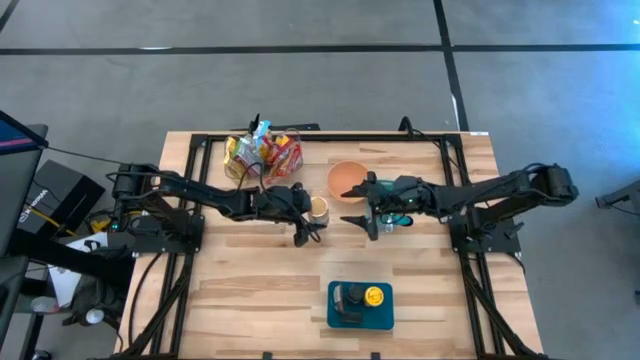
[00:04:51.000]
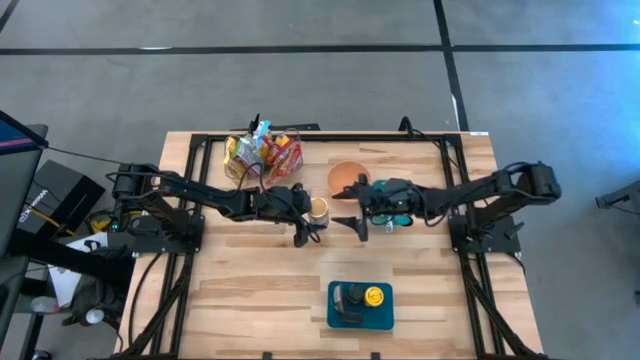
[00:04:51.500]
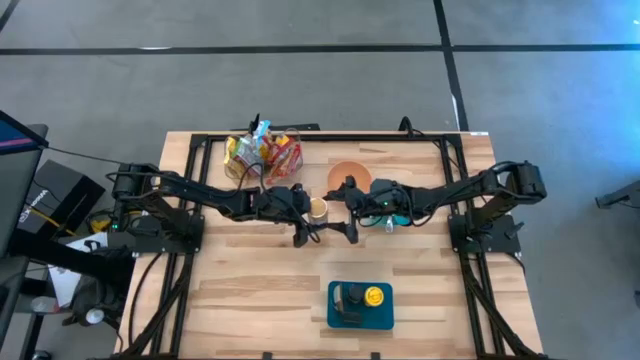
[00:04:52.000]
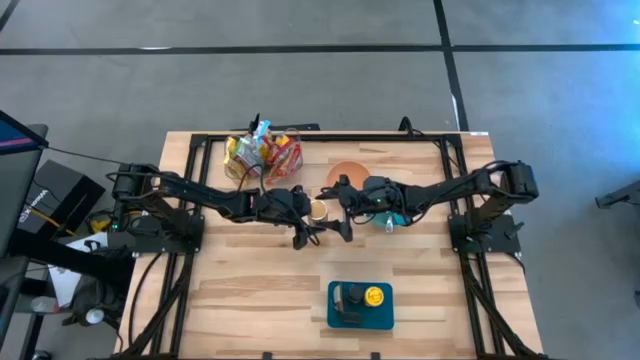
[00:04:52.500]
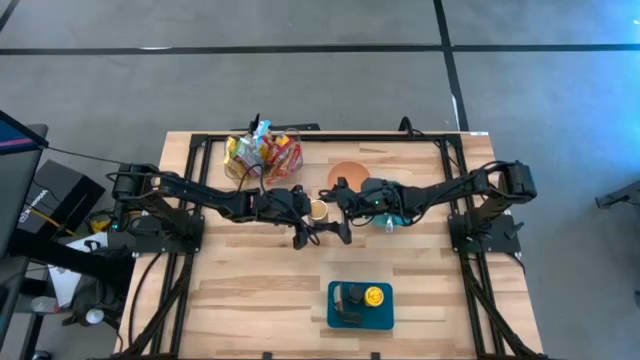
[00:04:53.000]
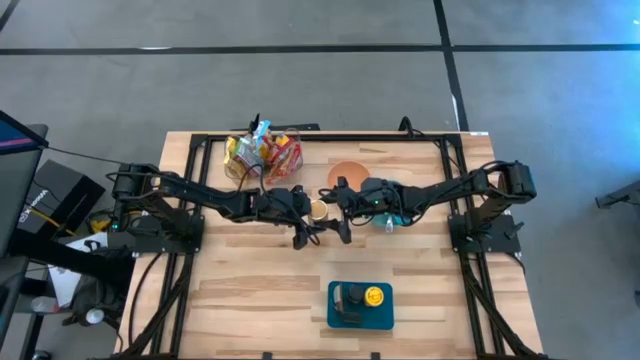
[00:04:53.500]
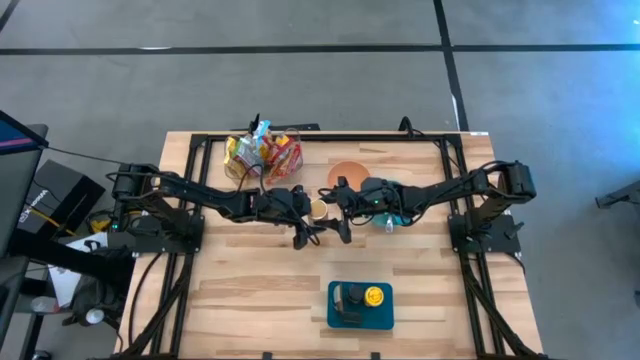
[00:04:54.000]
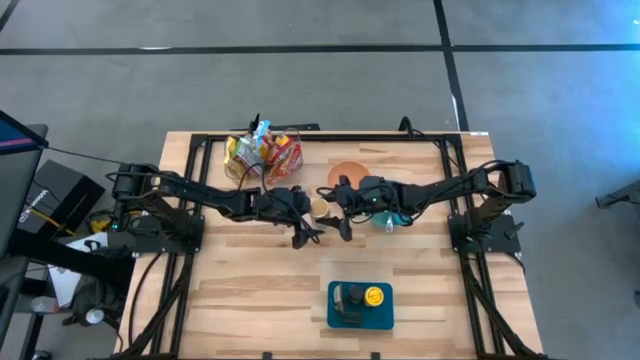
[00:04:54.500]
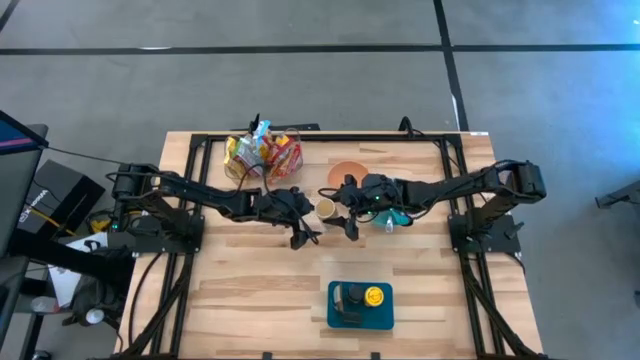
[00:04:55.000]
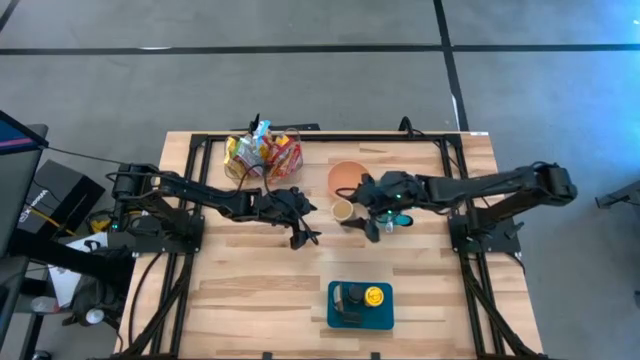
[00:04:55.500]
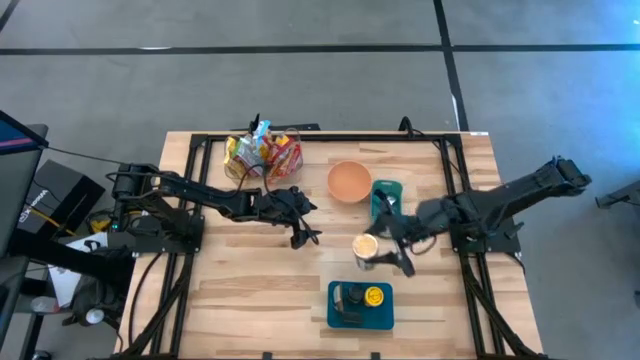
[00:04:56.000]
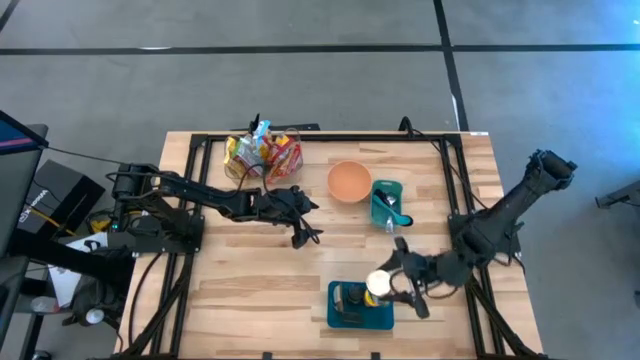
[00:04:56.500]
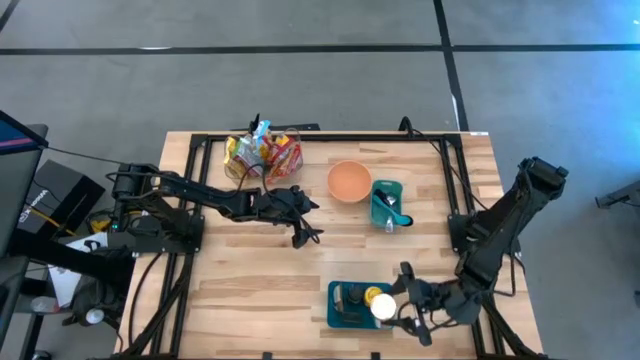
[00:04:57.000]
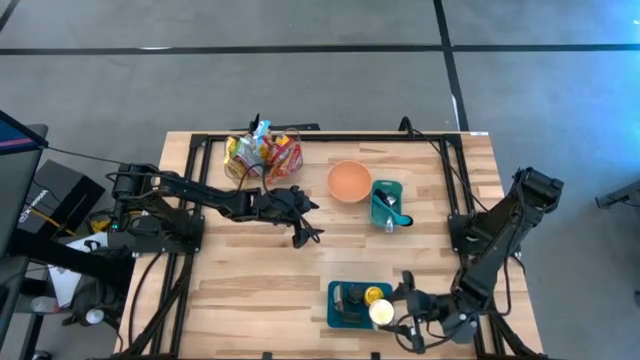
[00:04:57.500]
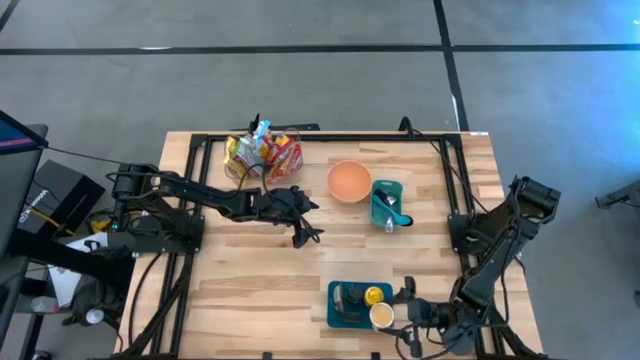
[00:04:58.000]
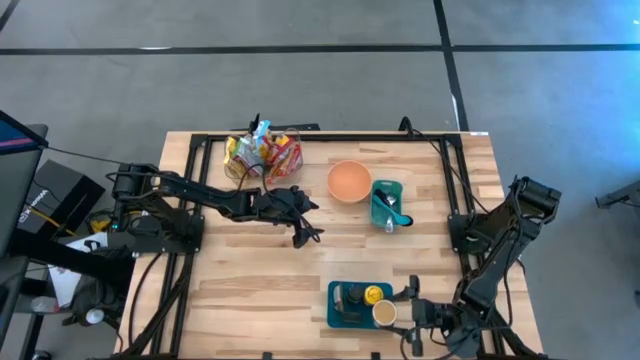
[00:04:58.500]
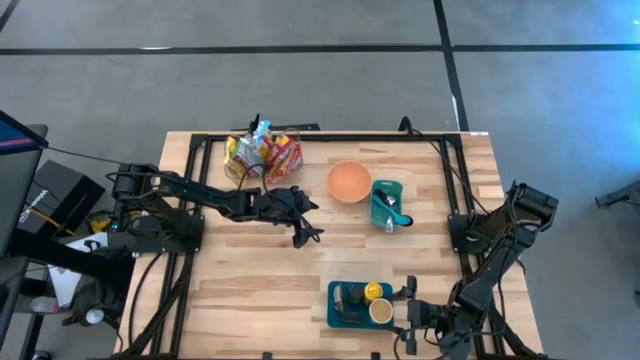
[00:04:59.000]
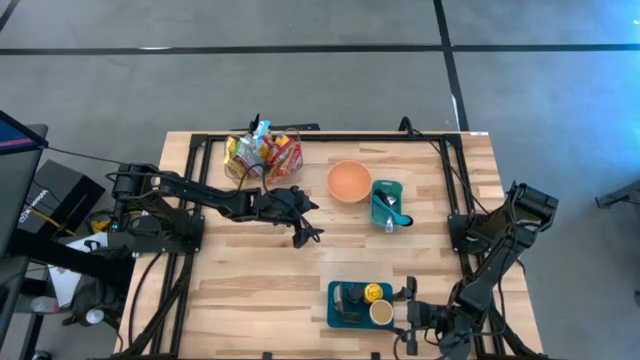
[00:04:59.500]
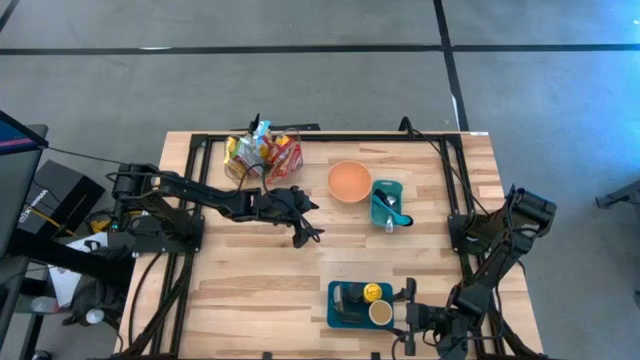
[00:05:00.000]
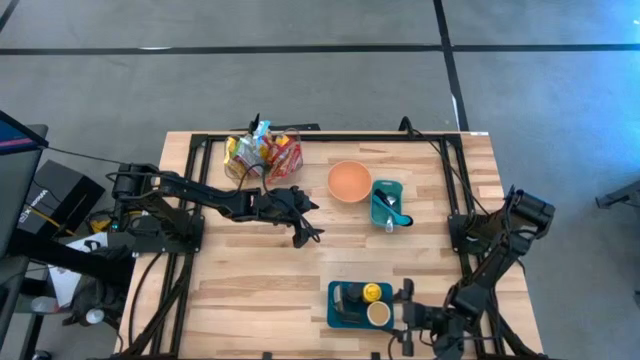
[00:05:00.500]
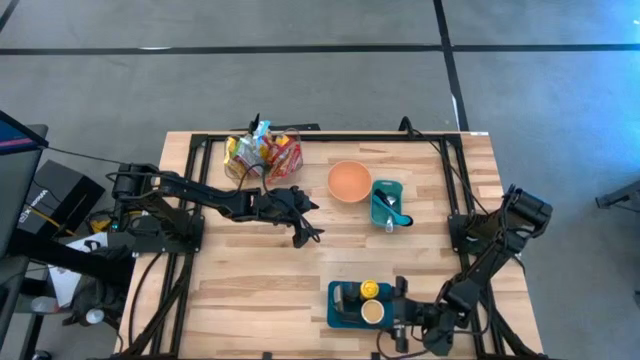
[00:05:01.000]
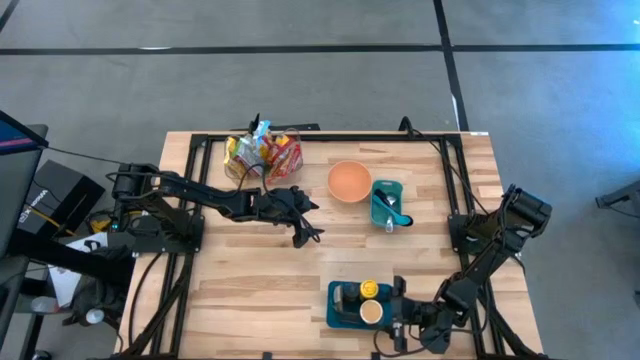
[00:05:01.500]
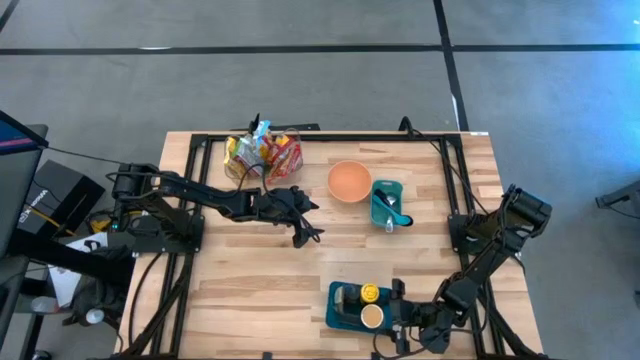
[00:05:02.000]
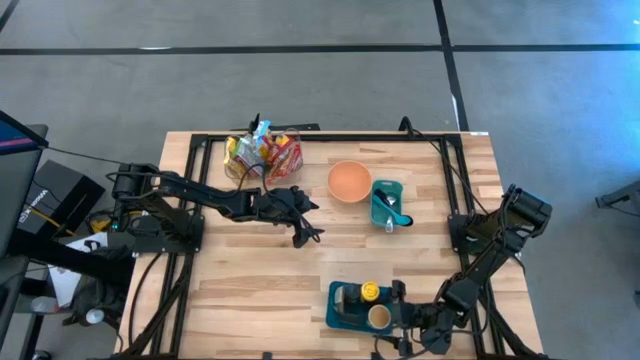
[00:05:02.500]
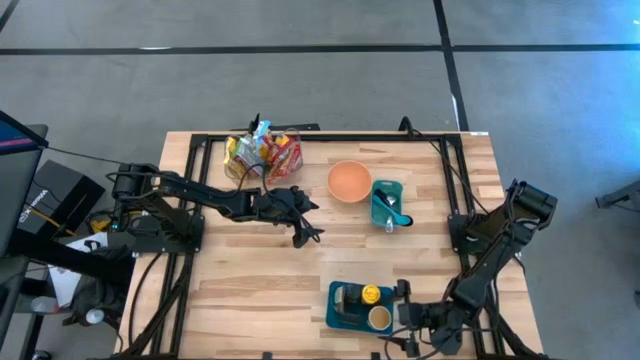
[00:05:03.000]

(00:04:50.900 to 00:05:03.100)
Task: Pick & Place Food Item
Put the gold seasoning bottle into the blue bin

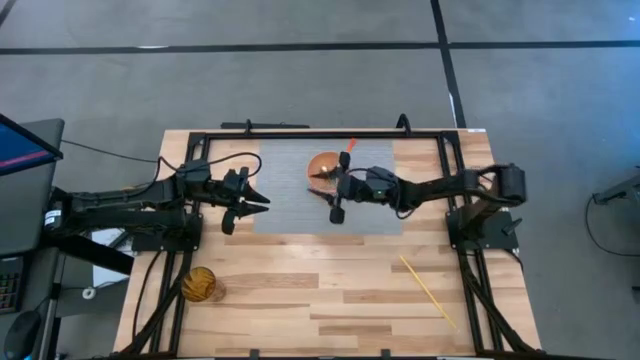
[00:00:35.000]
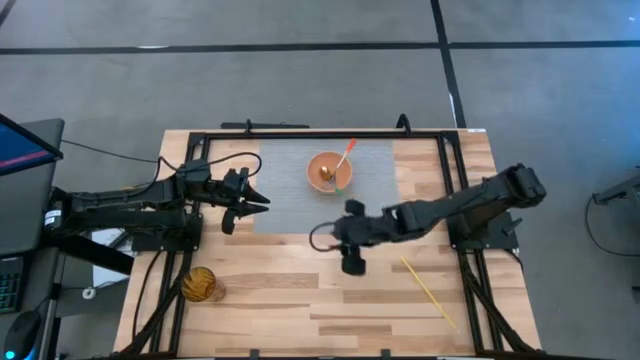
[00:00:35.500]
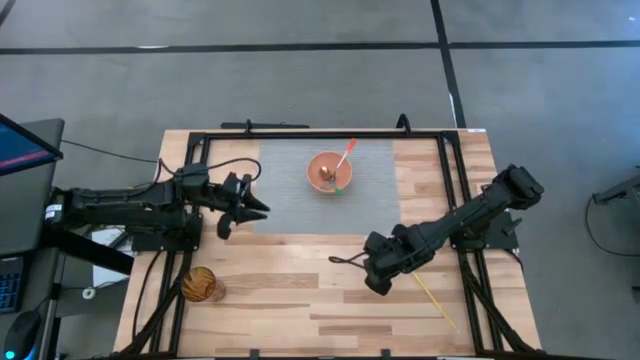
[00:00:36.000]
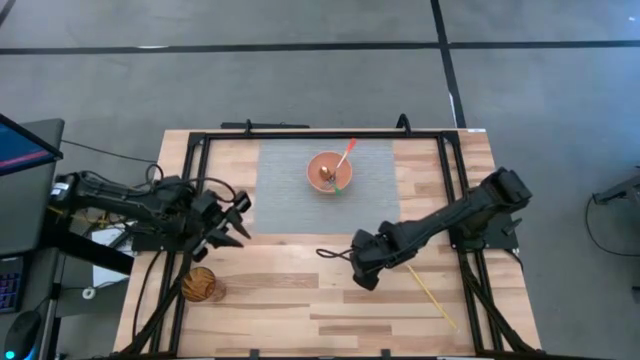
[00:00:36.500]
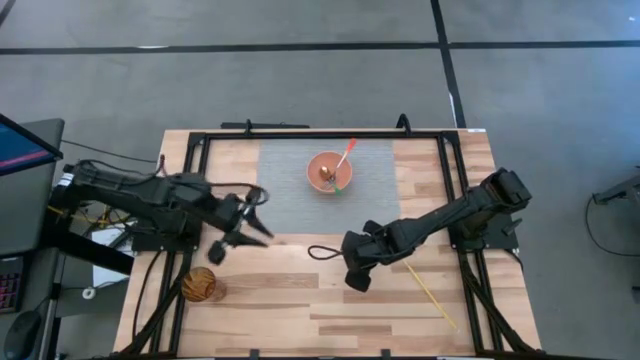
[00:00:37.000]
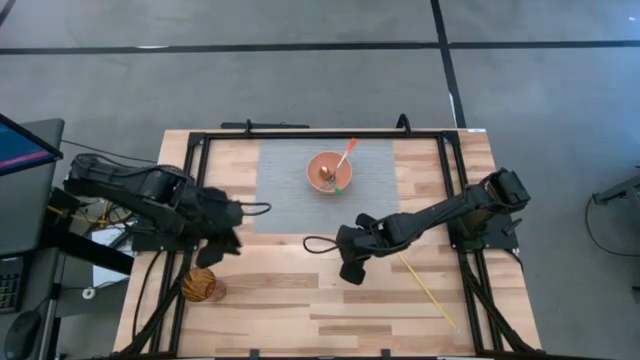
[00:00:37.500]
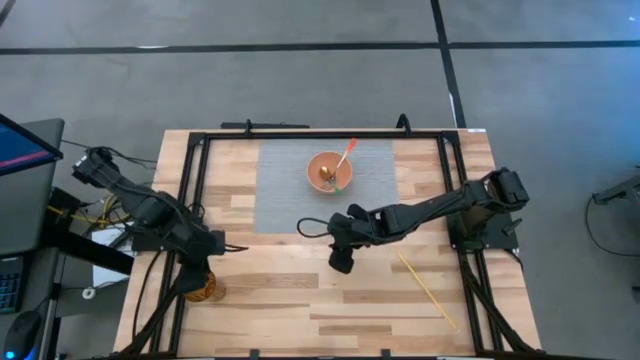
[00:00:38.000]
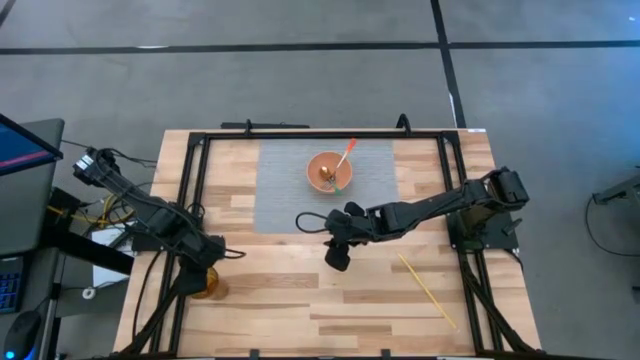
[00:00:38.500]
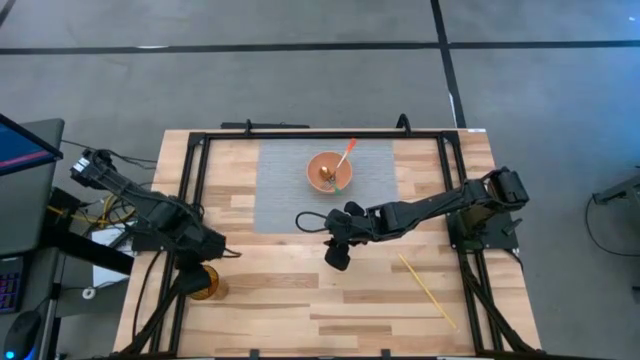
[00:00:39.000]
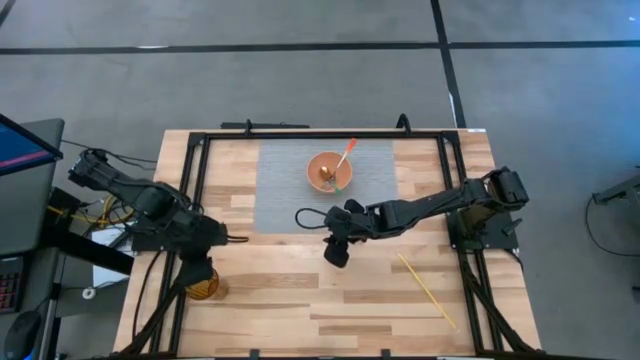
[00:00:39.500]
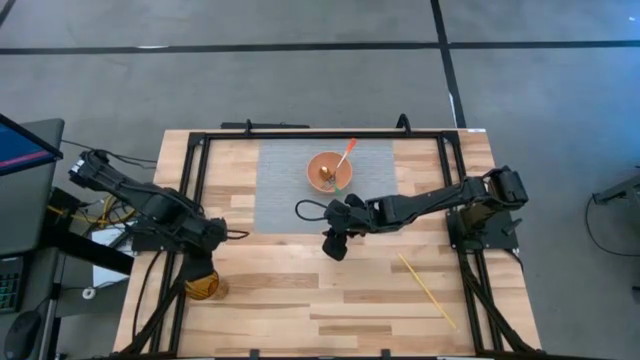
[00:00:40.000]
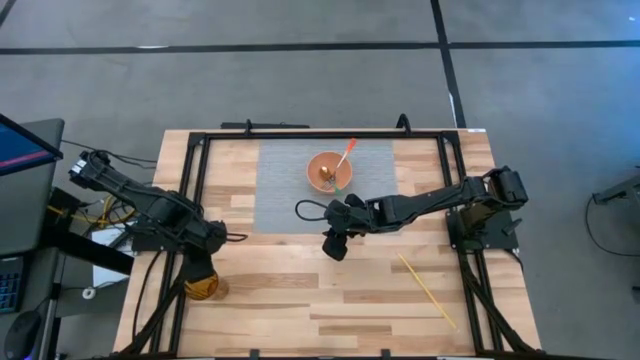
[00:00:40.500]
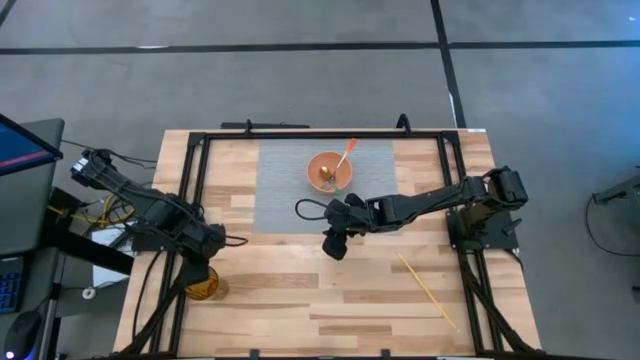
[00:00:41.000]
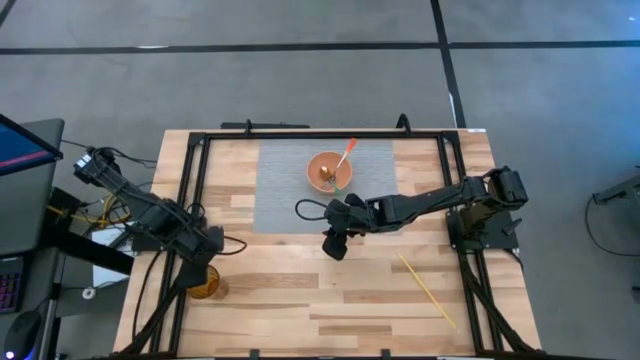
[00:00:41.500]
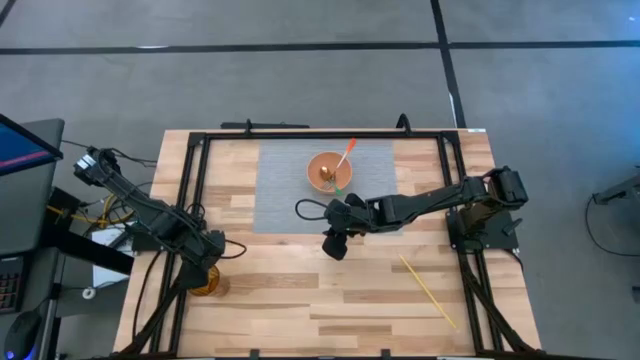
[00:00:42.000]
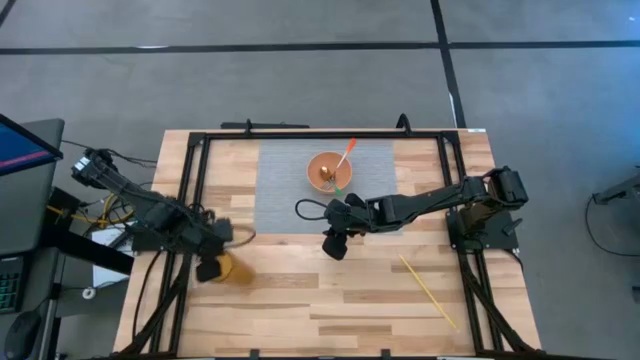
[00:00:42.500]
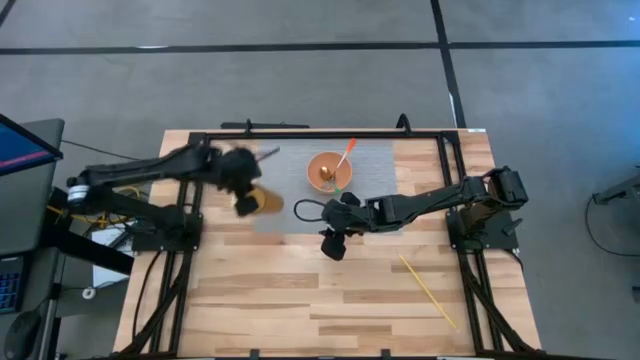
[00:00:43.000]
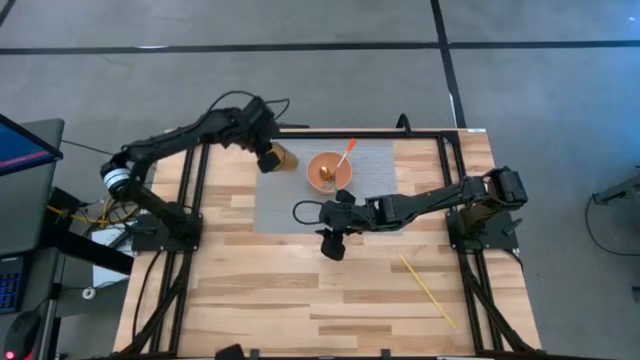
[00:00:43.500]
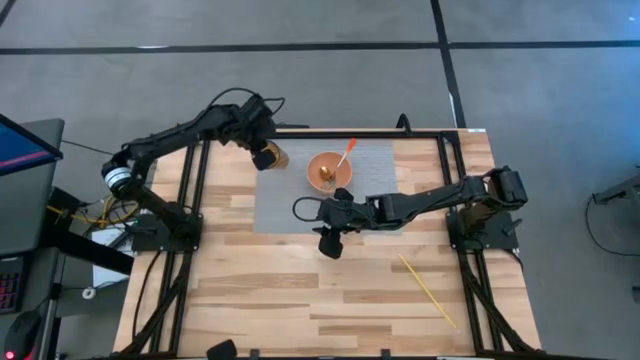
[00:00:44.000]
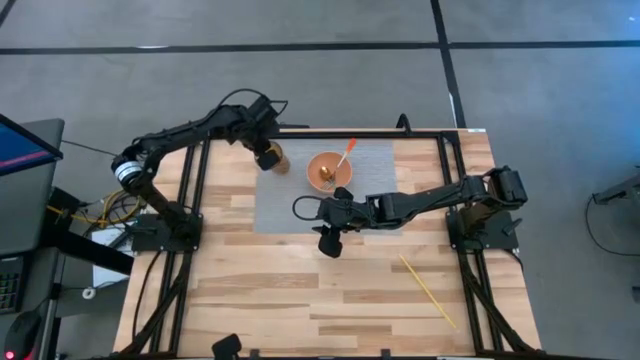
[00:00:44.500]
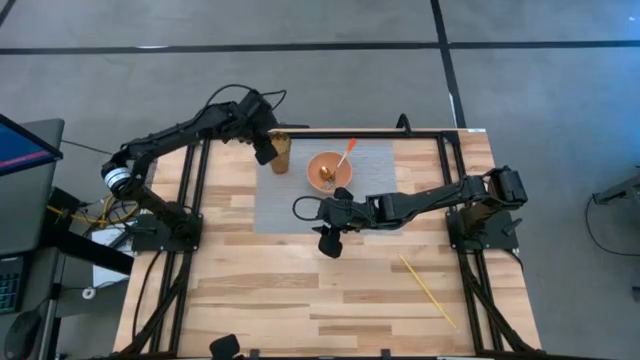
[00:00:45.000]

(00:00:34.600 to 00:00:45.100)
Task: Pick & Place Utensil
Put the orange glass cup on the gray tablemat to the left of the brown bowl
